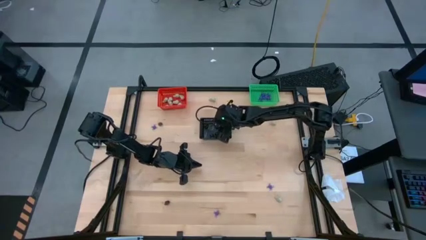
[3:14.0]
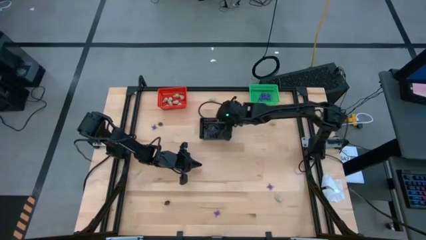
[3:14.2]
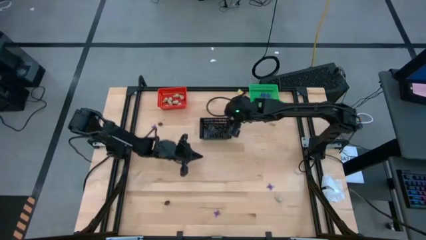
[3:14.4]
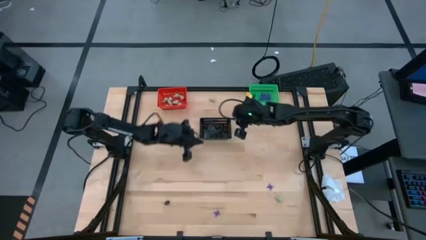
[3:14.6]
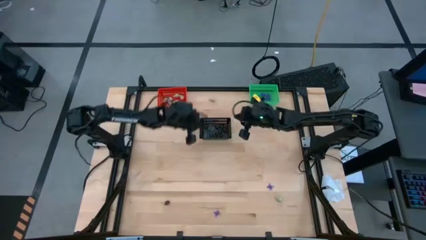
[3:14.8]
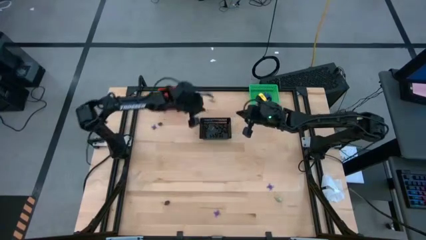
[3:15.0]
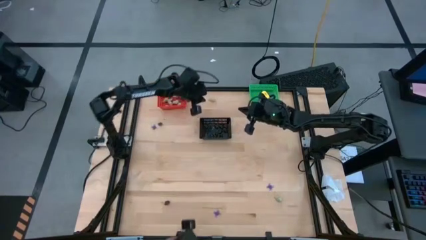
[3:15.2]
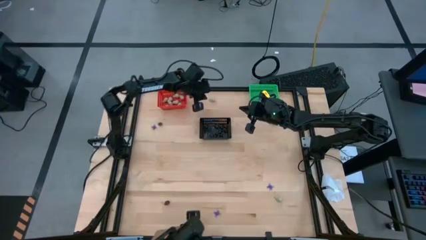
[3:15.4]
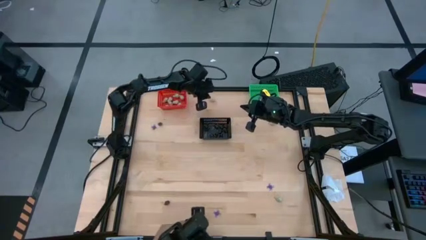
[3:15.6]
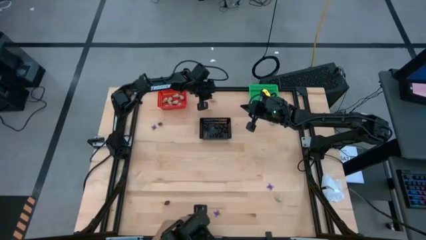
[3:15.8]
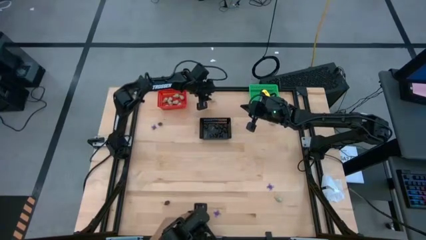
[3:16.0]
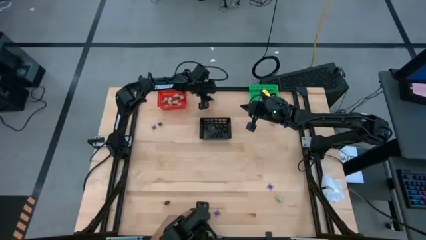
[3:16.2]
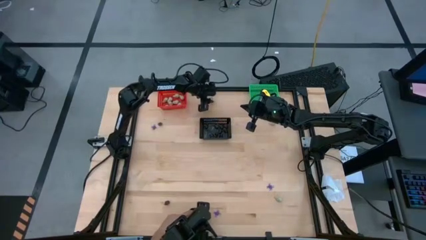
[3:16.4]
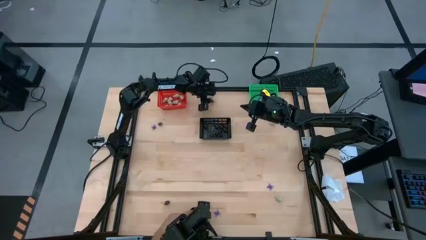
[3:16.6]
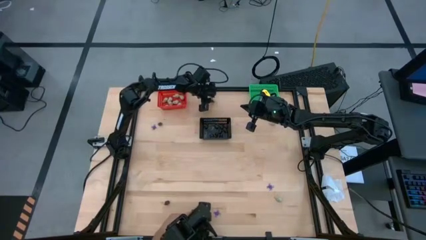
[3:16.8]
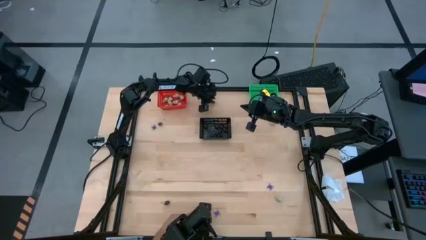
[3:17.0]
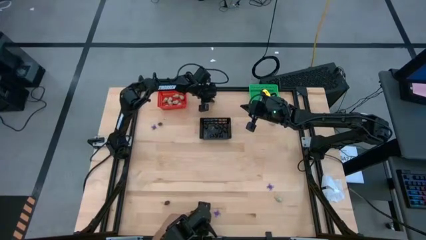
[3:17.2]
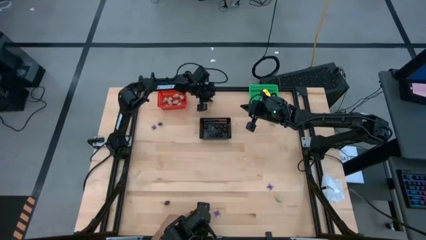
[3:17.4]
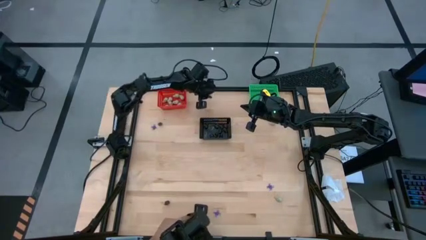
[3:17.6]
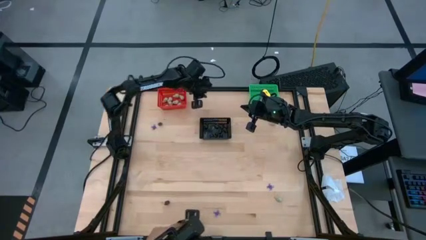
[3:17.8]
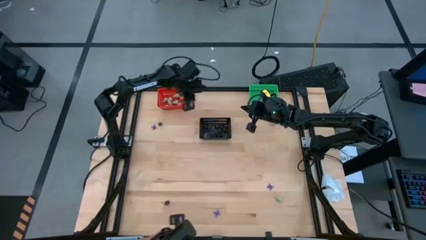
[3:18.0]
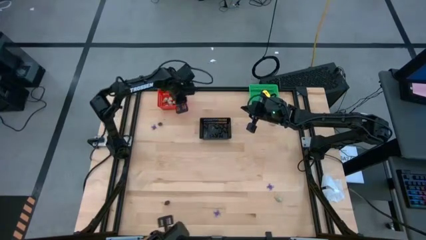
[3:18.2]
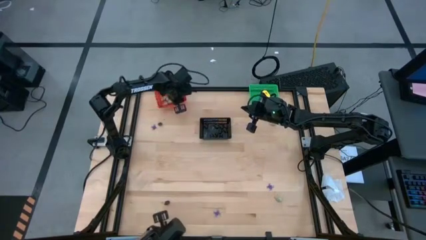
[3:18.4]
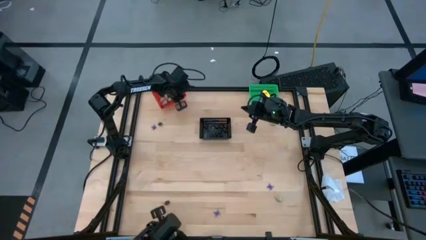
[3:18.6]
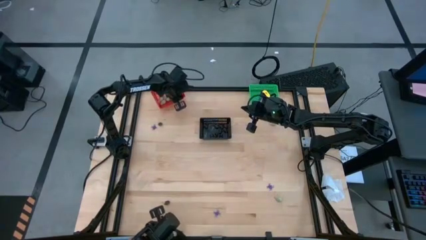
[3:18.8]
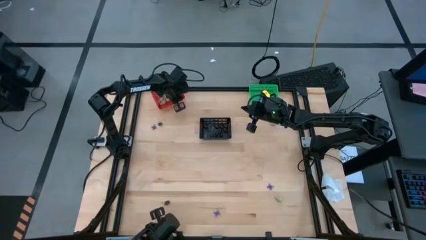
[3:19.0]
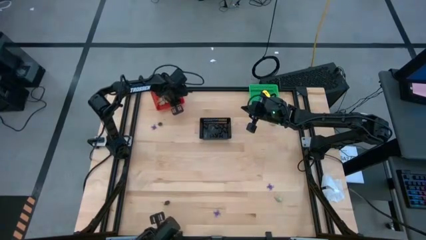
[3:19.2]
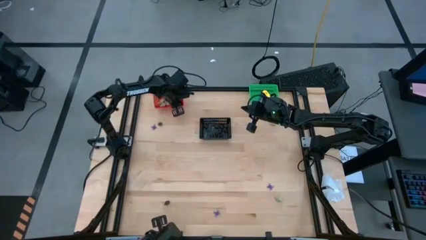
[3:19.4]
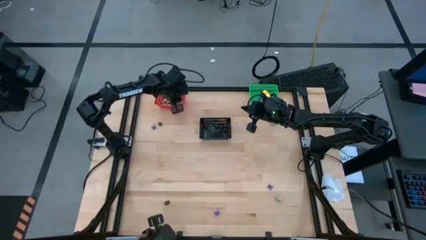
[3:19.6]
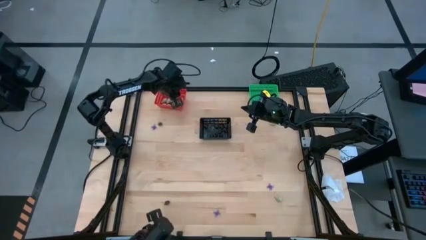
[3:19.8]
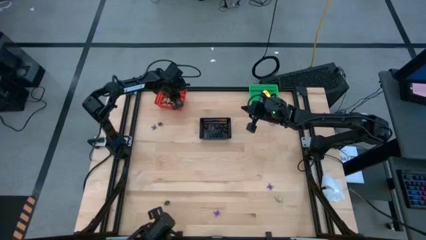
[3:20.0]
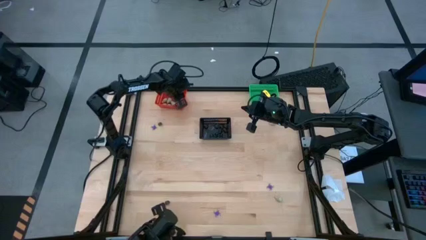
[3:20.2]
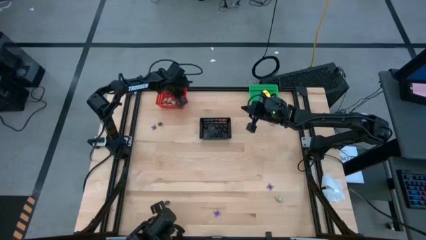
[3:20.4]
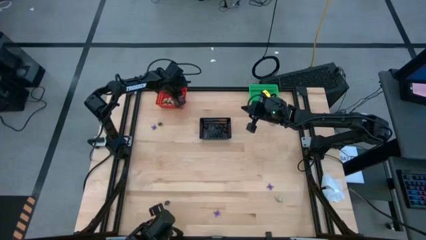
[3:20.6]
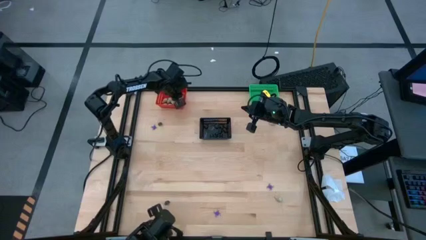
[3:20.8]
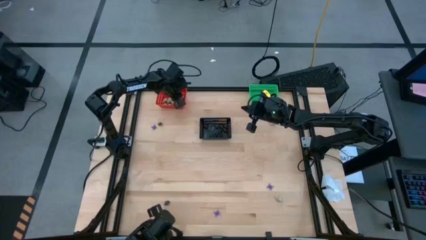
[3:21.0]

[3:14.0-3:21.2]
Task: Sort Halloween decoration
Put the white skull toy into the orange bin

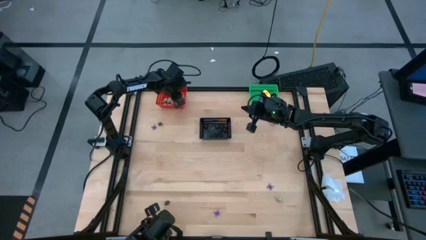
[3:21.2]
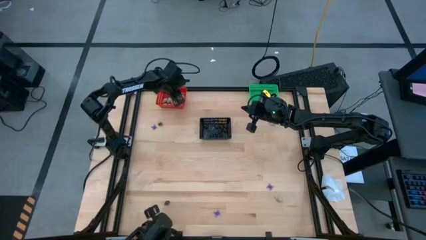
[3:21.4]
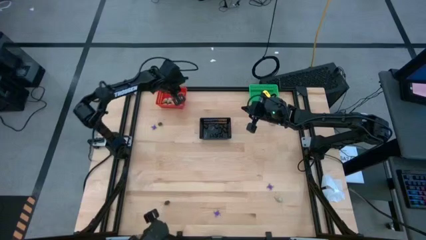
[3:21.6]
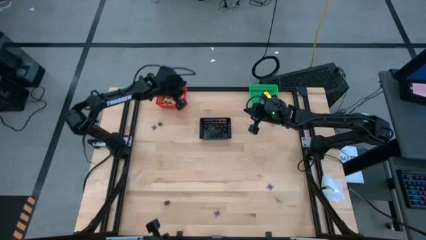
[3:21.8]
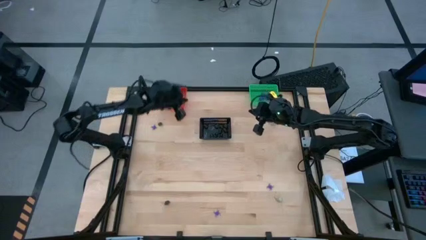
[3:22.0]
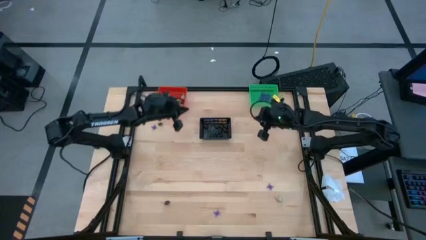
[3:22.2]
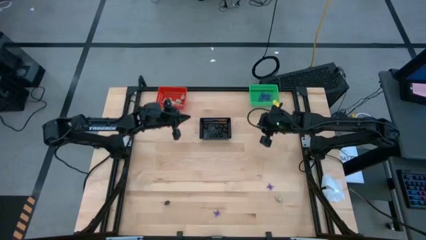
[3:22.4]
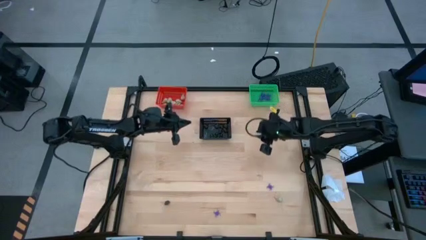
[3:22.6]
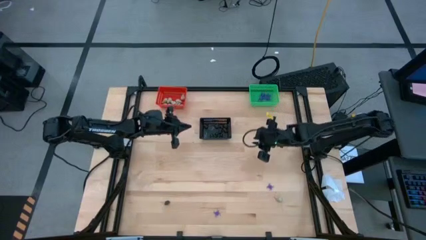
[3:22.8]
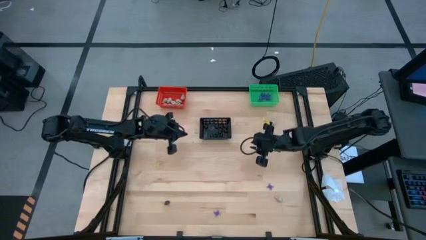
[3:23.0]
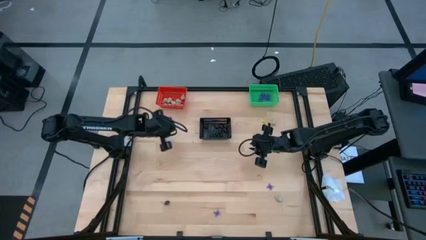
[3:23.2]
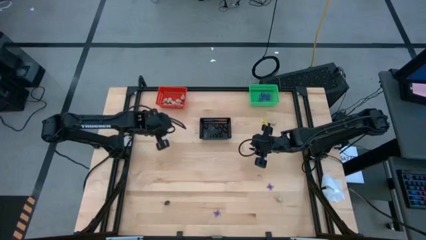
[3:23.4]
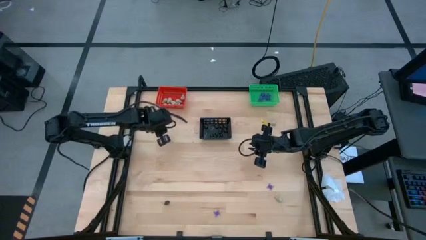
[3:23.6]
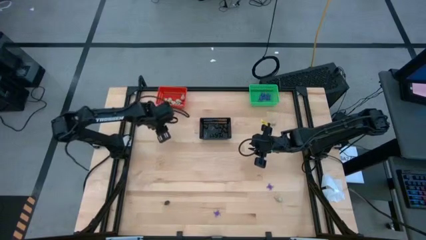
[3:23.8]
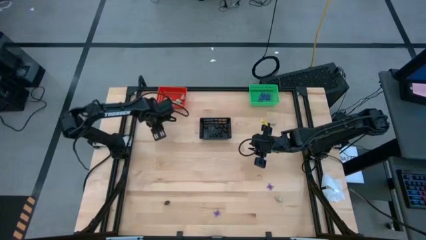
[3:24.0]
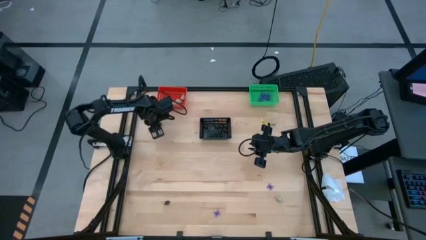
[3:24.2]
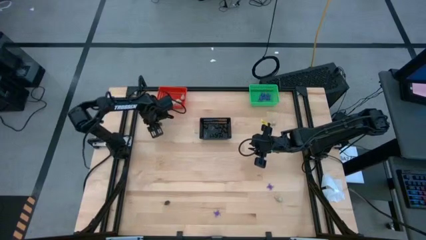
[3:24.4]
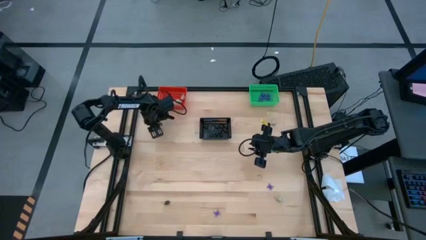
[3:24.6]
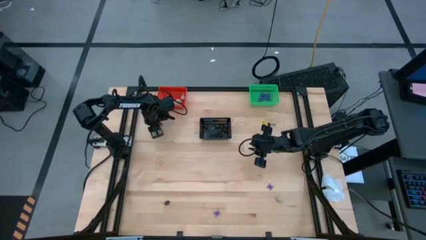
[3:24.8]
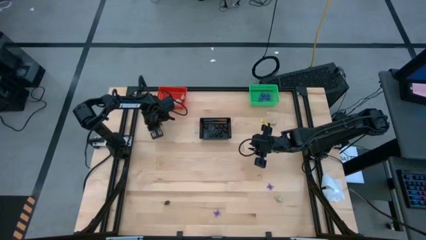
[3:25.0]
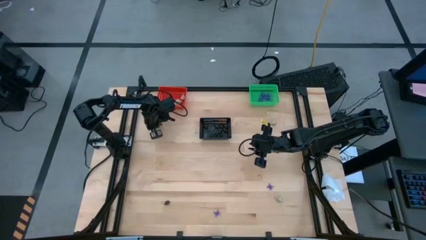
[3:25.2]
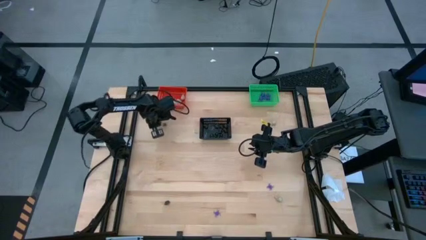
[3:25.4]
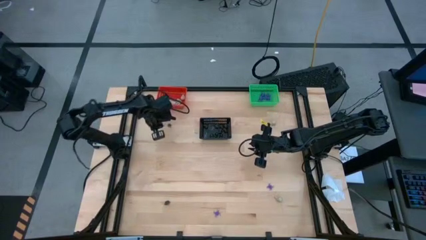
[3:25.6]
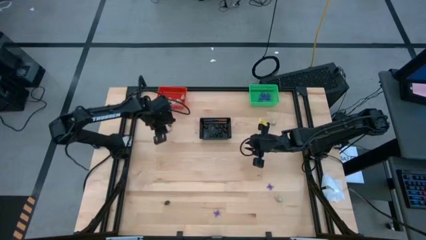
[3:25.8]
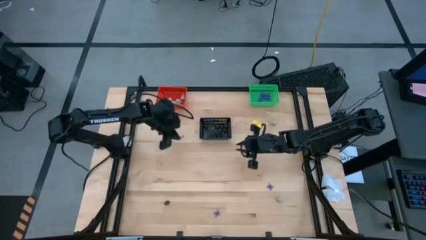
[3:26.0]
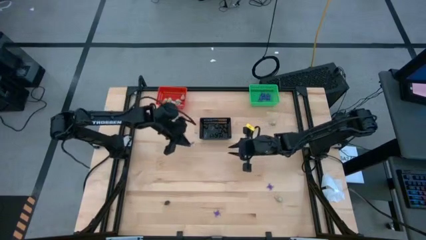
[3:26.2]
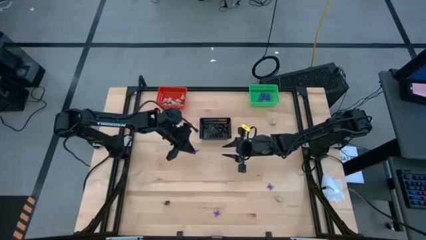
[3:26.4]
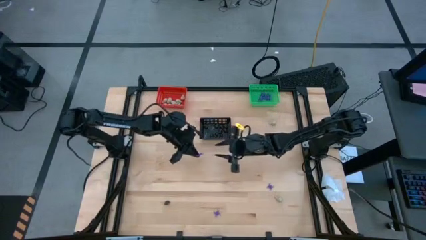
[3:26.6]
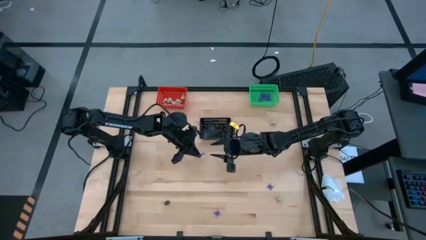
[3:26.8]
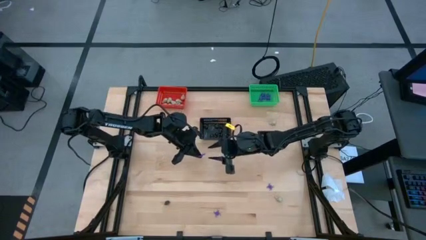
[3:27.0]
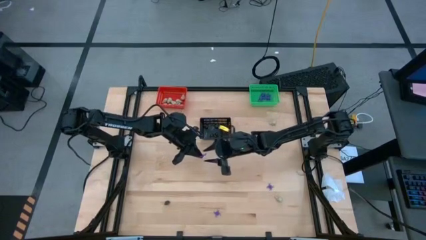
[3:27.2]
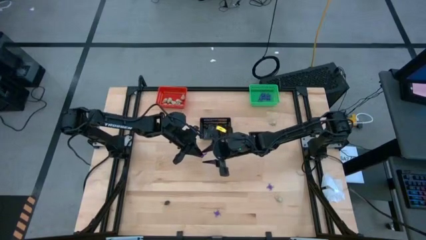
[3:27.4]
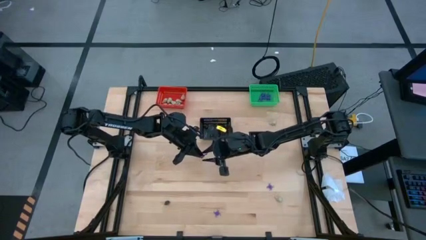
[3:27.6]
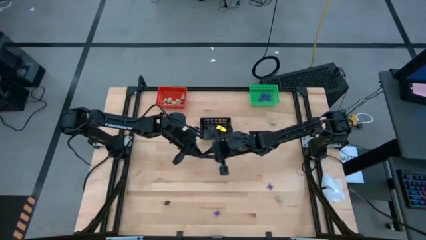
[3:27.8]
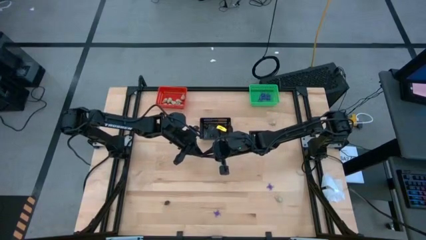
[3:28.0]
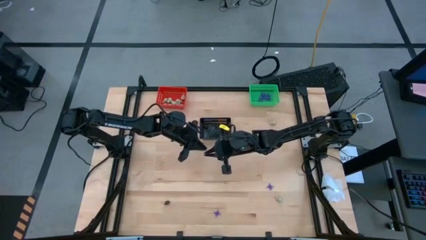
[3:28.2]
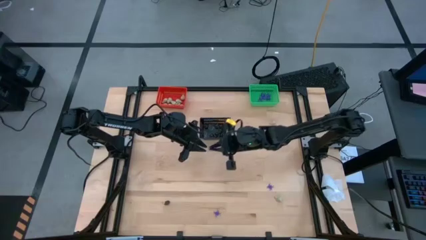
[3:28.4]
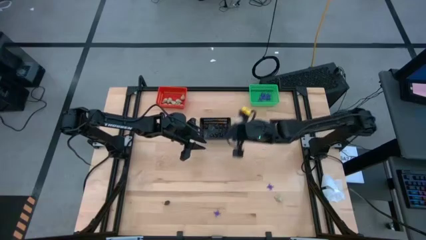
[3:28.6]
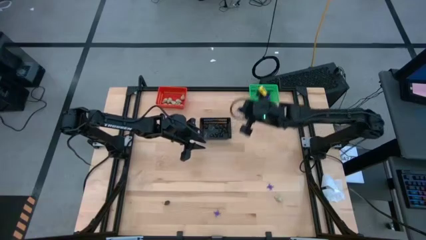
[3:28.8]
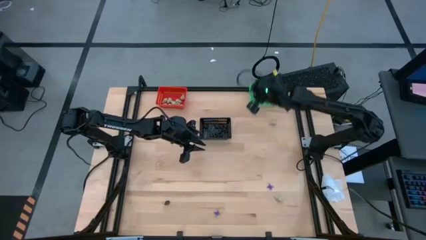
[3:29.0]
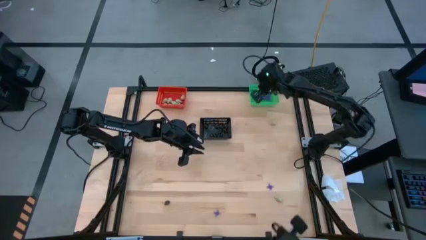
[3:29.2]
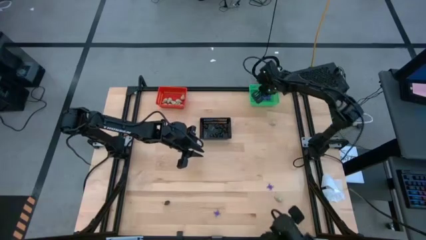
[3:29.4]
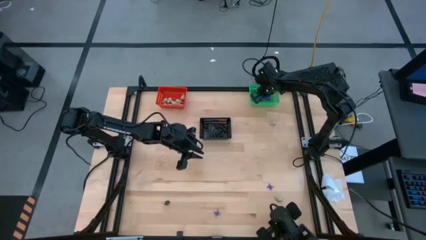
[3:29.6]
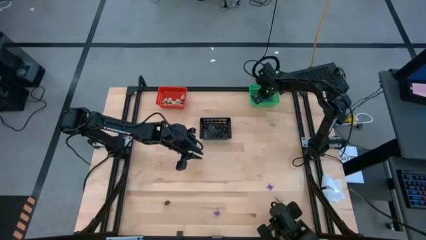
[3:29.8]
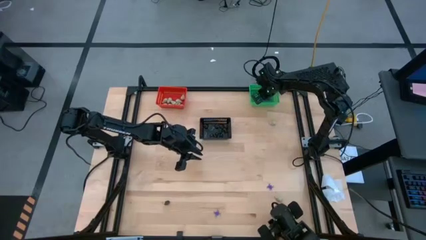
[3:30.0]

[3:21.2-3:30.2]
Put the violet spider toy into the green bin
